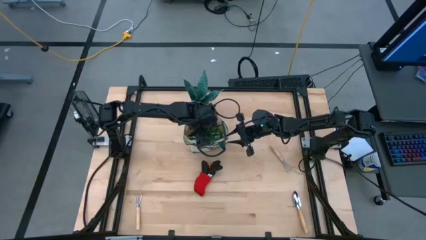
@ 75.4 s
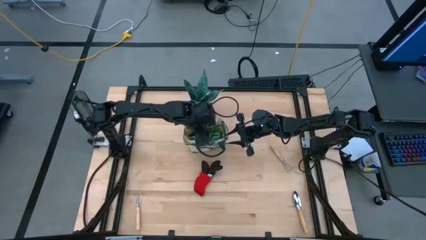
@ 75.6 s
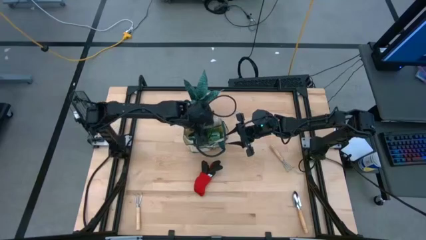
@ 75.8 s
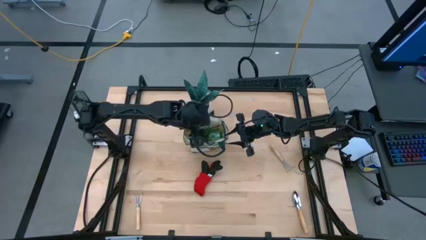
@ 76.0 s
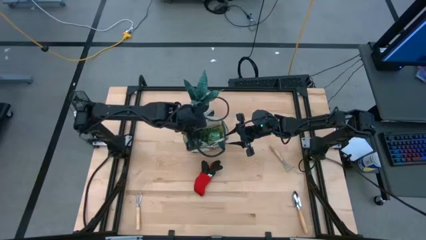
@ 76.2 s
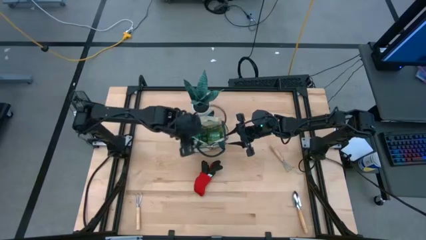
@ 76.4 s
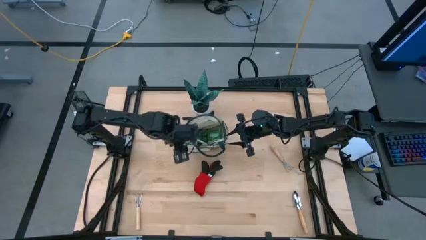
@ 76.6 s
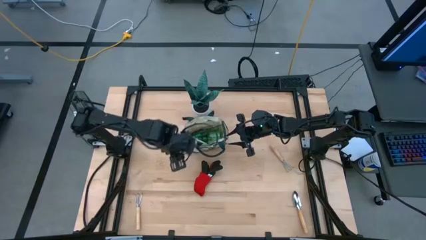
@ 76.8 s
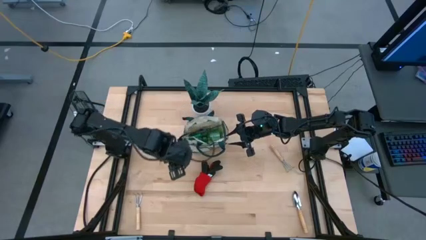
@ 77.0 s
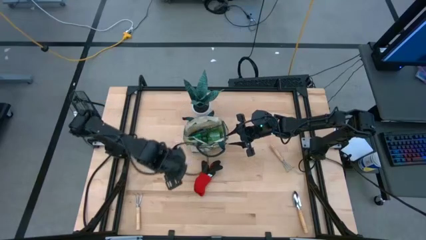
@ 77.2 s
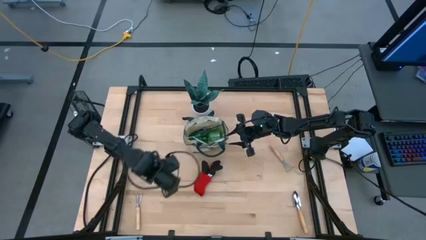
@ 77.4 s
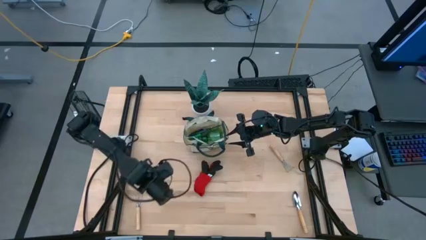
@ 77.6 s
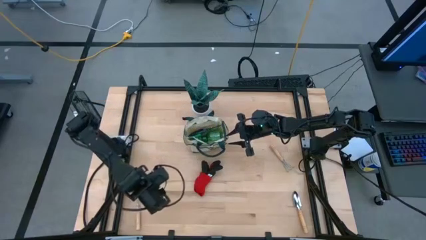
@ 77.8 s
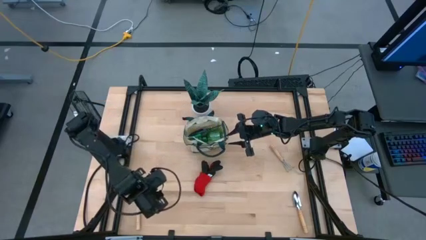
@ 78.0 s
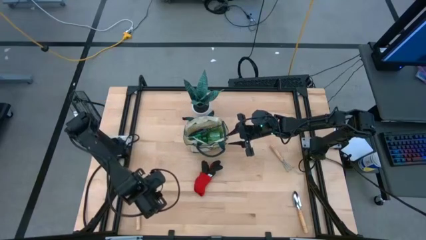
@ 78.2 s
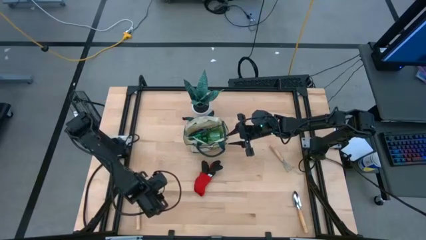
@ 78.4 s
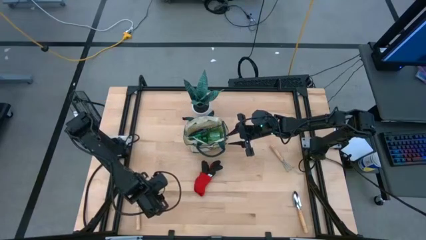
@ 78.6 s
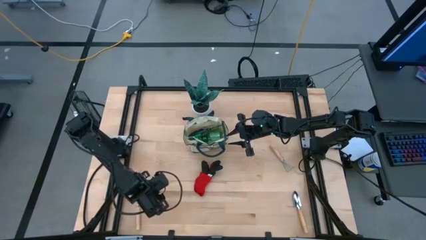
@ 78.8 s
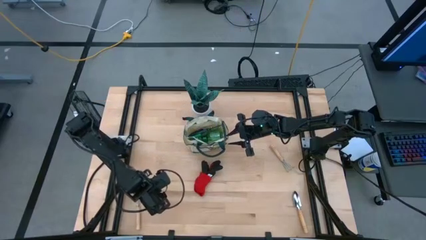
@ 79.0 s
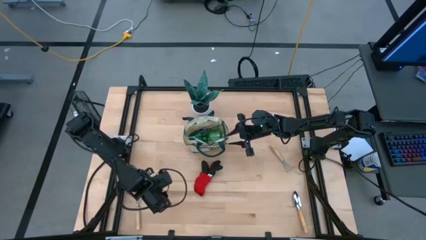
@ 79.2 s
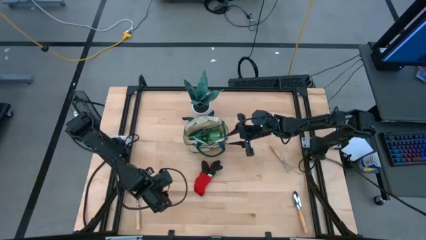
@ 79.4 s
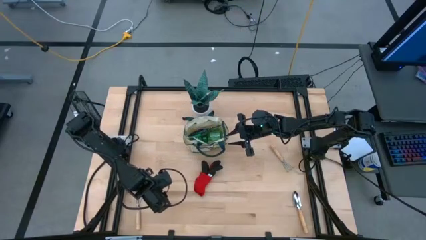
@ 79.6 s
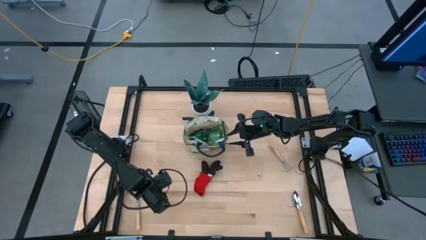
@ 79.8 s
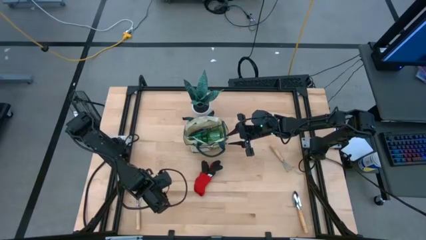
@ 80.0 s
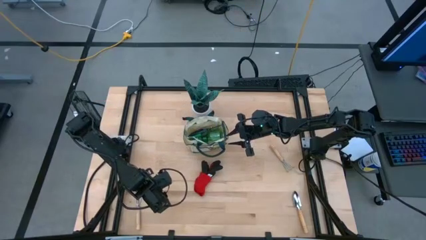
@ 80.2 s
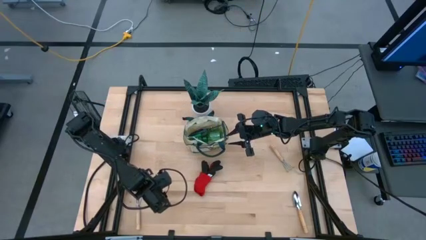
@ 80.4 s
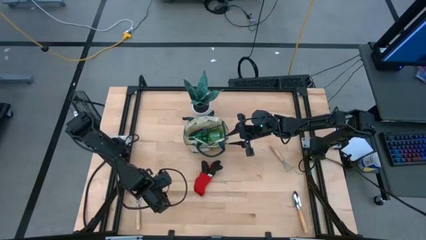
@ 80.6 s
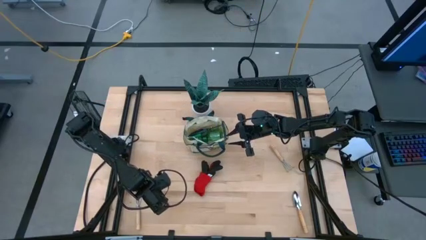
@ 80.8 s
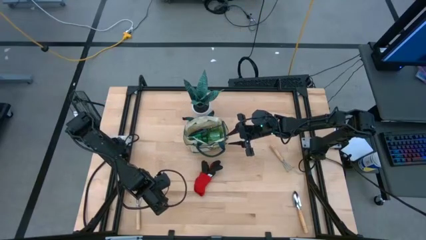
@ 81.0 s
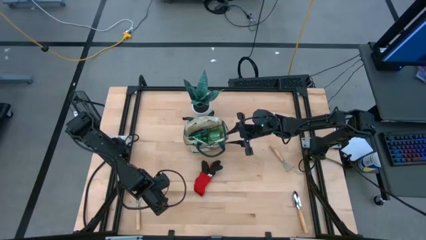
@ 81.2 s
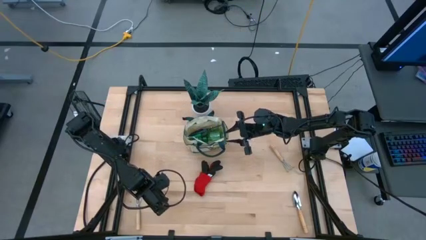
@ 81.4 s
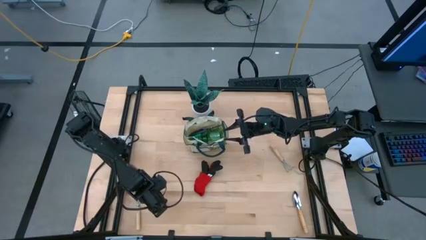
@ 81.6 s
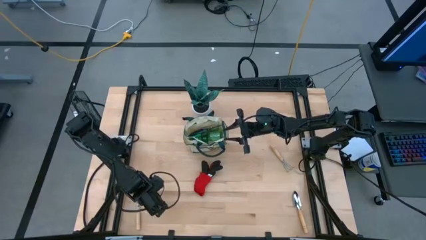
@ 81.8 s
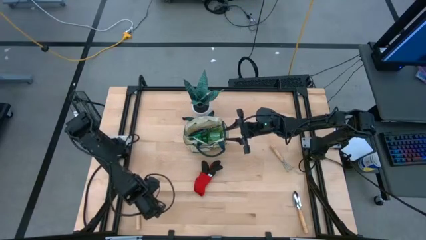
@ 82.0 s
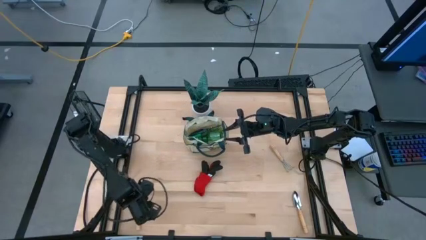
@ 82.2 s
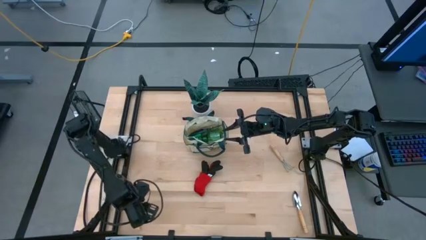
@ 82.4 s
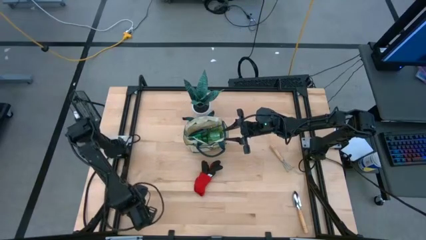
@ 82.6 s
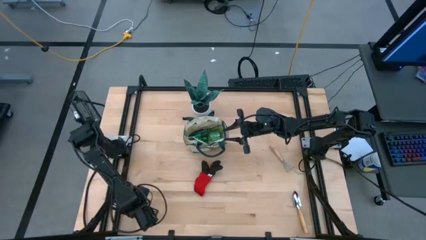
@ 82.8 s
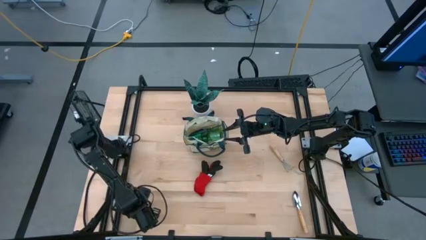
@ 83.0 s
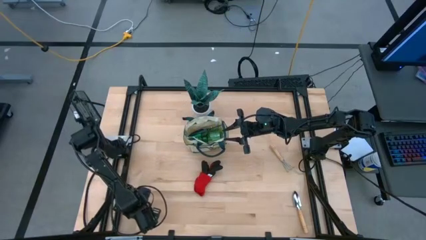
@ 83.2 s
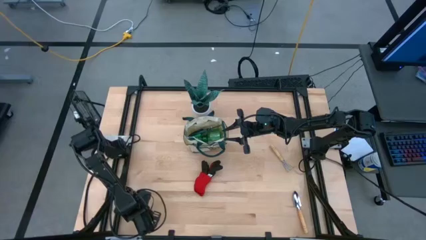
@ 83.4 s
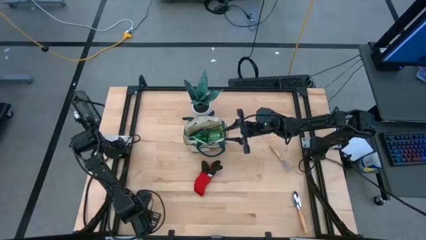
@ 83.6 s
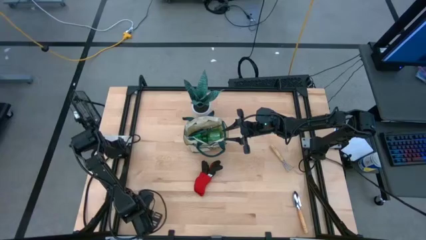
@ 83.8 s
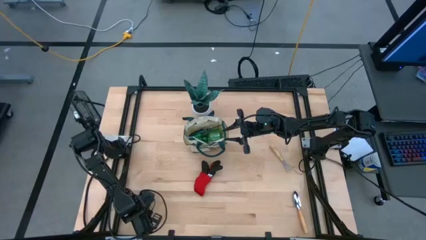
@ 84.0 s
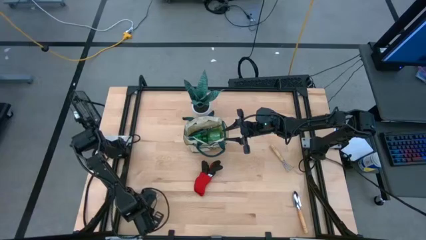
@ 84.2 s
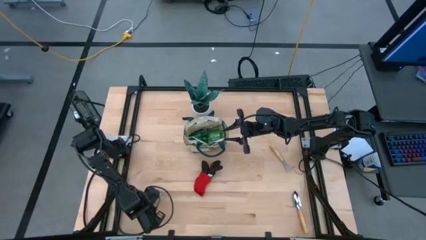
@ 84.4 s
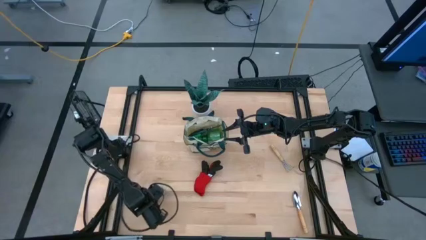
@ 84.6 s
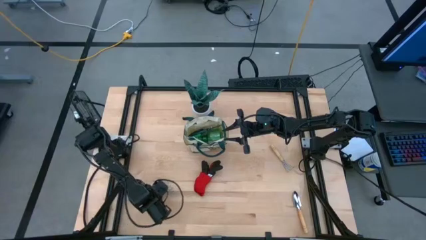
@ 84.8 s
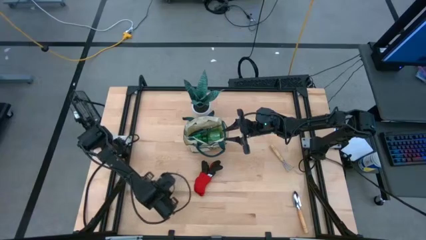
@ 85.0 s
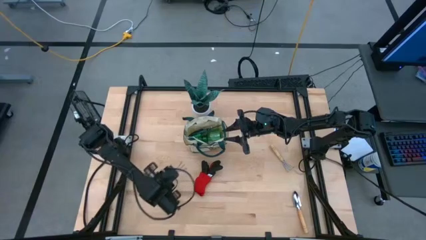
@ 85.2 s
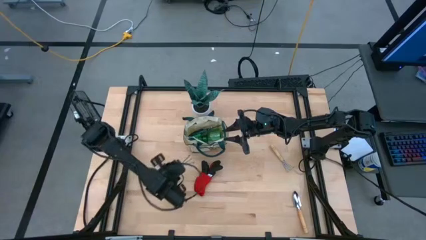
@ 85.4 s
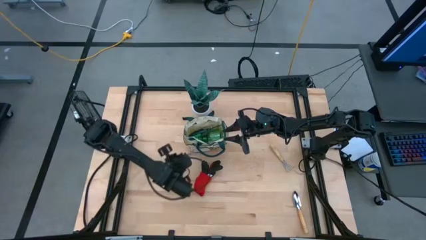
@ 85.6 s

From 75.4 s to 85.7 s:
Task: Pick & Place Garden tools in Gardening bag
Put the left brown hand rake into the gardening bag

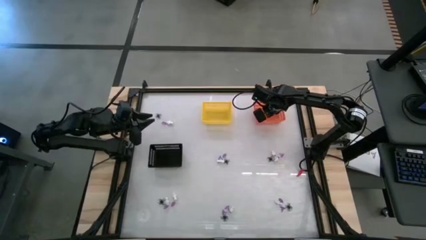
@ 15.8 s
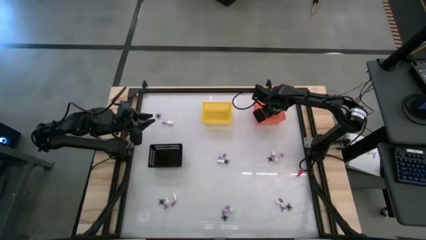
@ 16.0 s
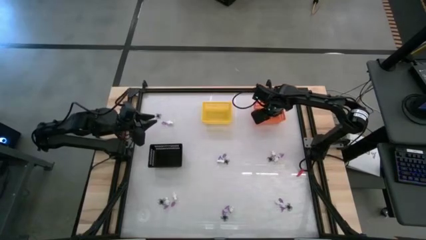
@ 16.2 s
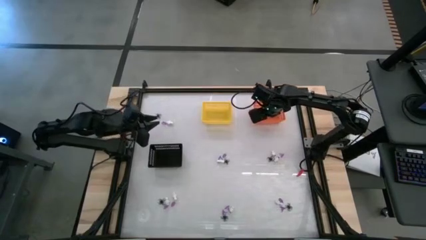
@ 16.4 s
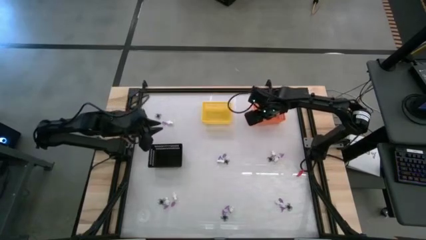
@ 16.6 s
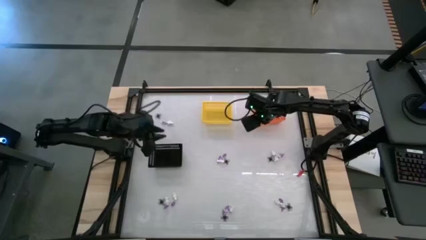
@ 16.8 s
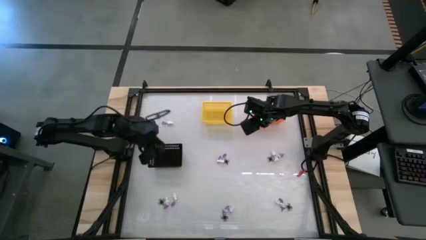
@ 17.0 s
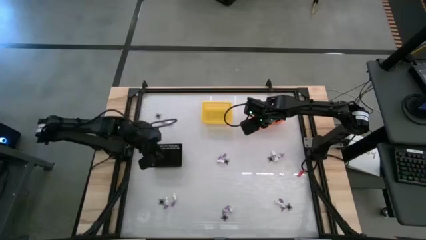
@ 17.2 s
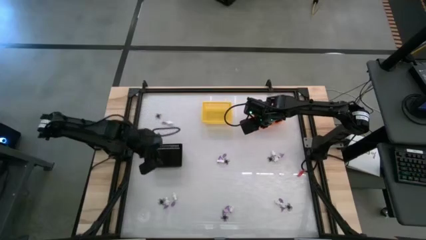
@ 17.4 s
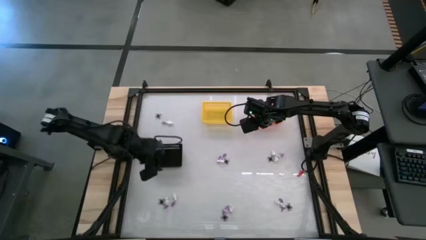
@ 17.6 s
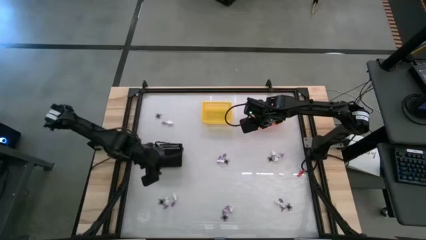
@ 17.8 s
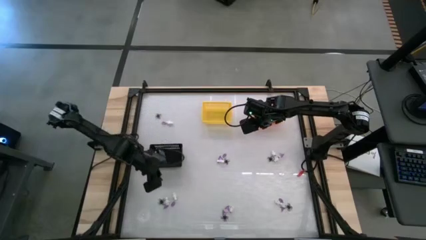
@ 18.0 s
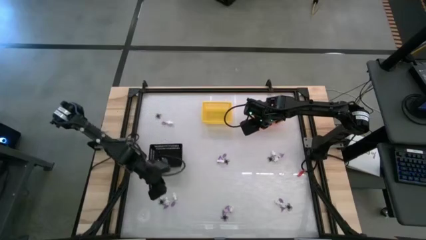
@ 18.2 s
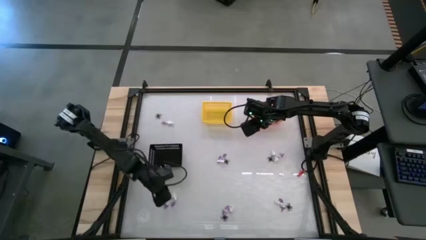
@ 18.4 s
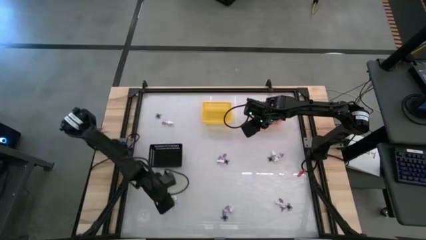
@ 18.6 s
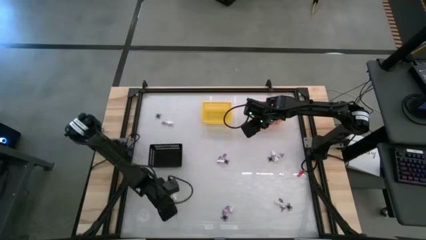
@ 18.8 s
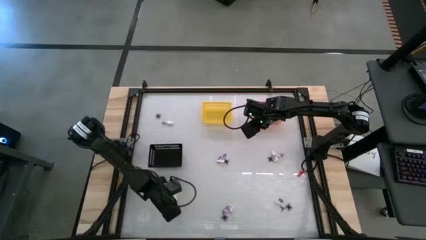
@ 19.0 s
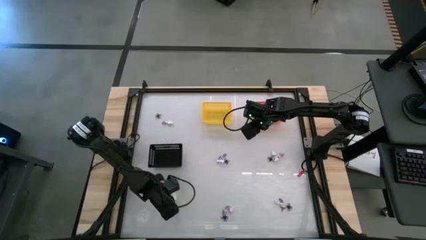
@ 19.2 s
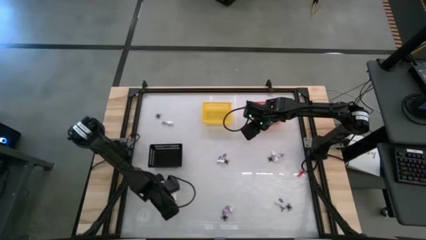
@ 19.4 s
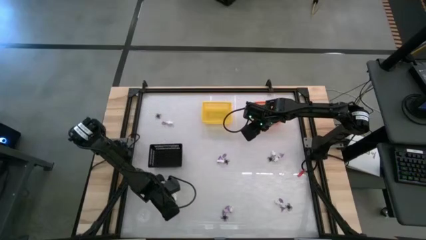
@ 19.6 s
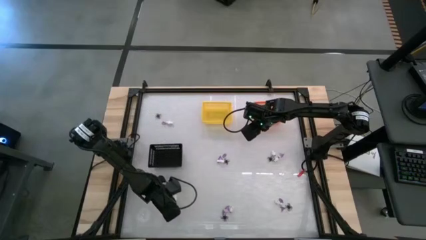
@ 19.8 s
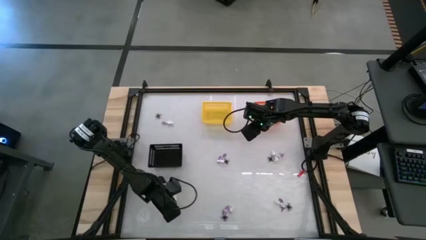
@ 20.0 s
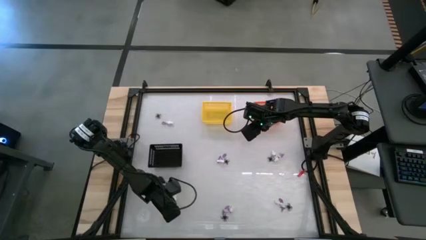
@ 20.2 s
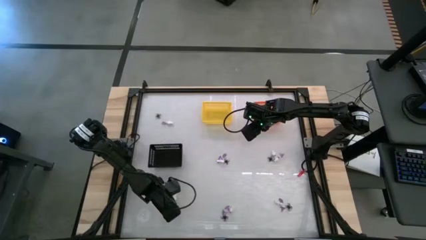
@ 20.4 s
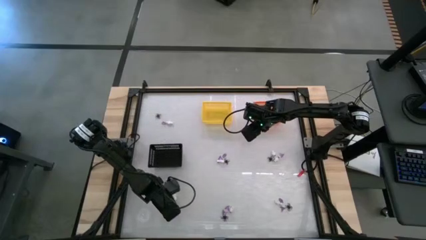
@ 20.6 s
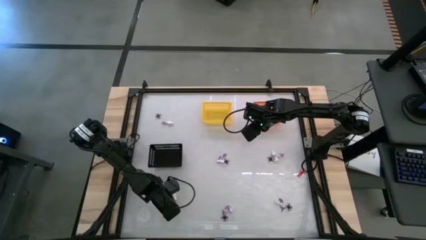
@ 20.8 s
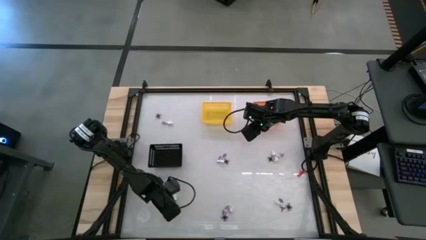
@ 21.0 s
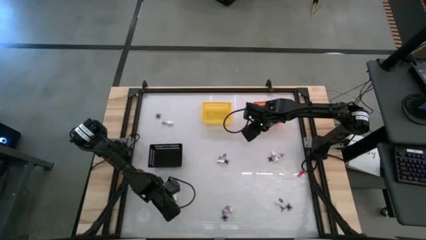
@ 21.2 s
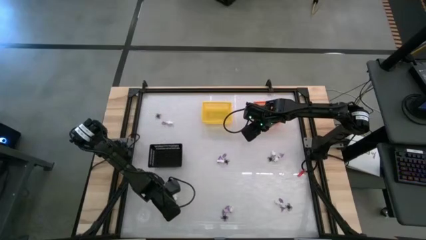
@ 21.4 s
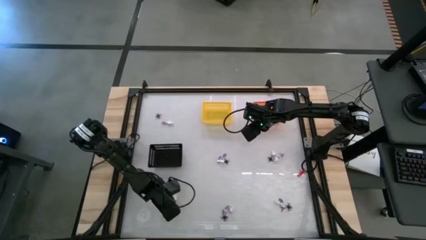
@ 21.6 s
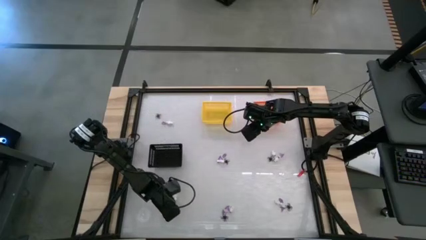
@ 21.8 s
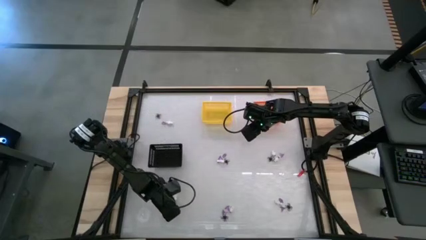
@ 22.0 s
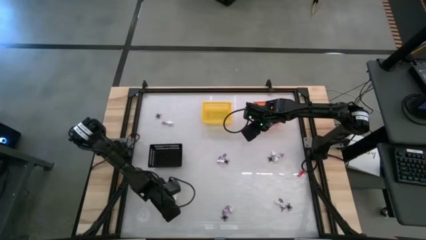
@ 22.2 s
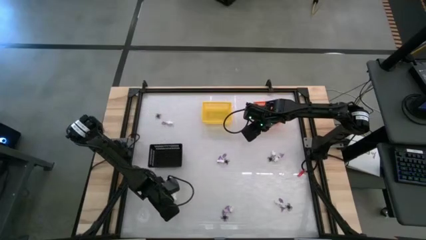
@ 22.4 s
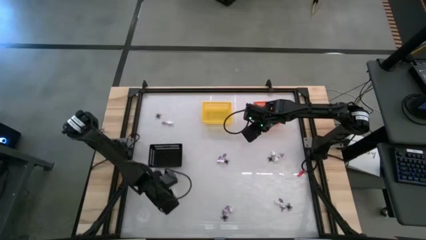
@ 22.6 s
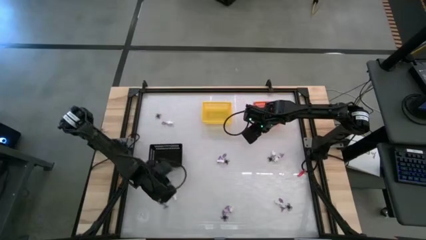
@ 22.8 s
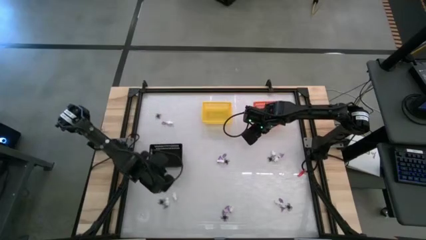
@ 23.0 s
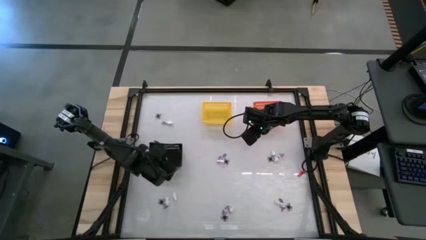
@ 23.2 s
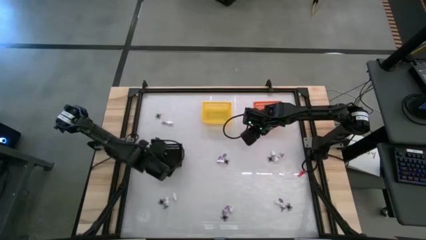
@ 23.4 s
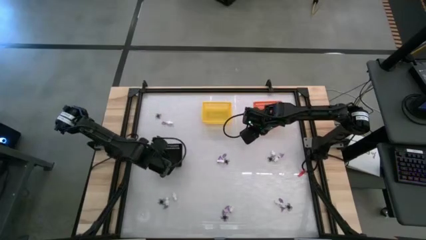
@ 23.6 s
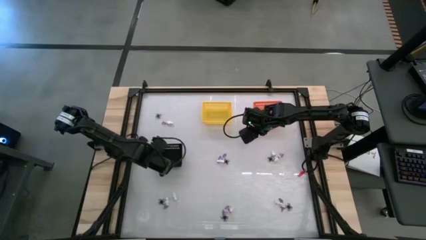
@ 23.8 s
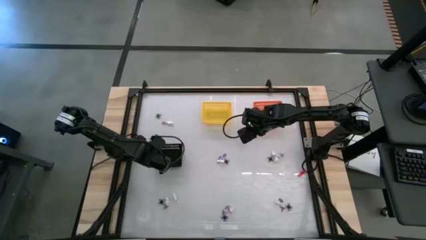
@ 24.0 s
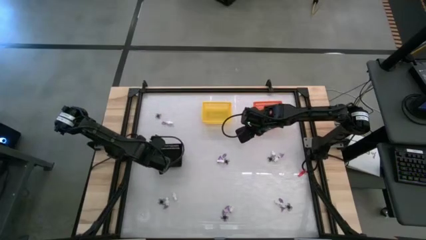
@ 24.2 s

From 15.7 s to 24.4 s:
Task: Sort Halloween decoration
Put the purple hat toy into the black basket
